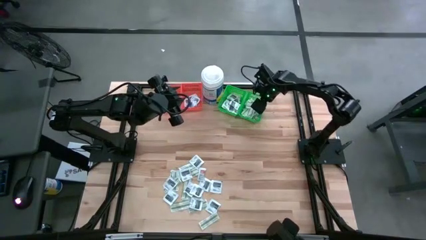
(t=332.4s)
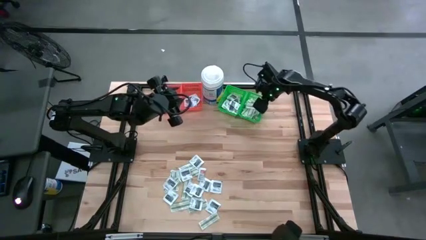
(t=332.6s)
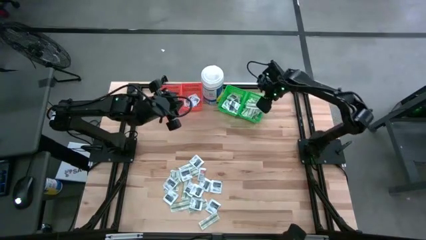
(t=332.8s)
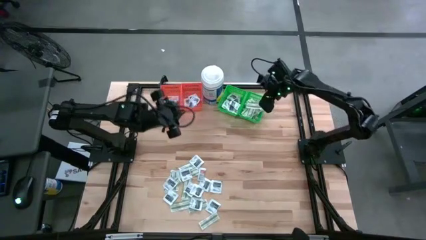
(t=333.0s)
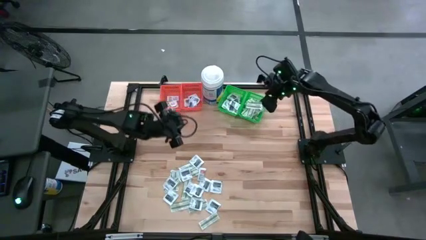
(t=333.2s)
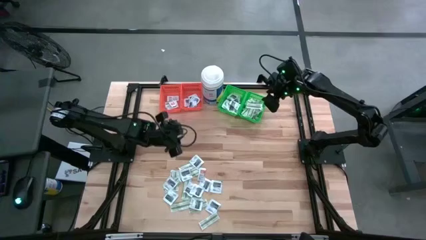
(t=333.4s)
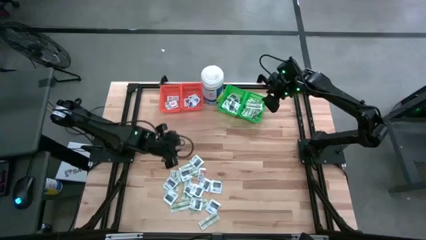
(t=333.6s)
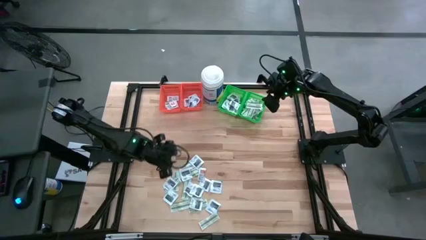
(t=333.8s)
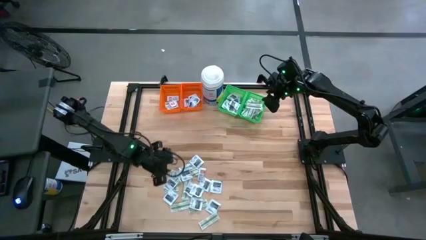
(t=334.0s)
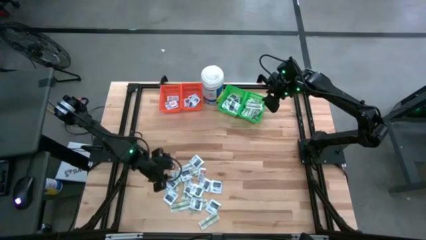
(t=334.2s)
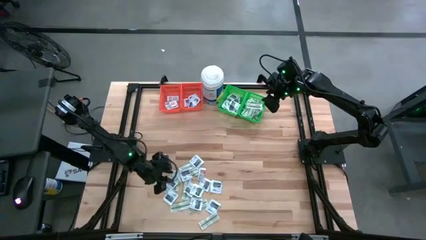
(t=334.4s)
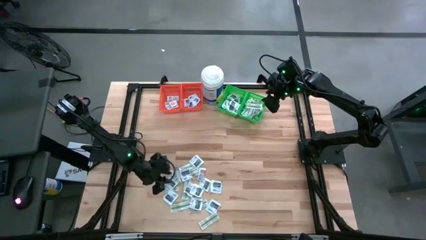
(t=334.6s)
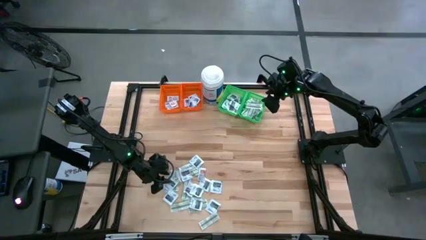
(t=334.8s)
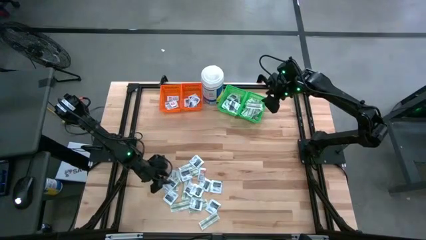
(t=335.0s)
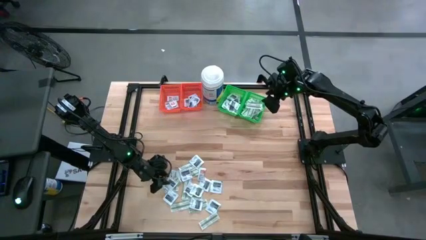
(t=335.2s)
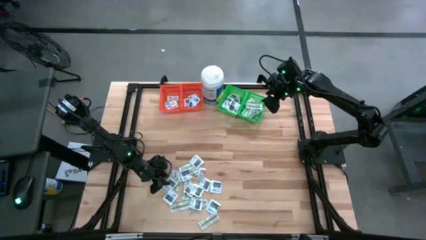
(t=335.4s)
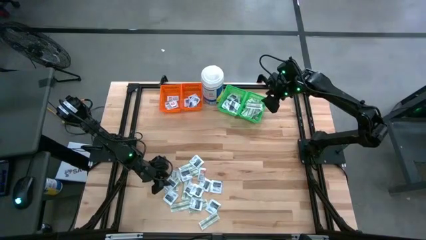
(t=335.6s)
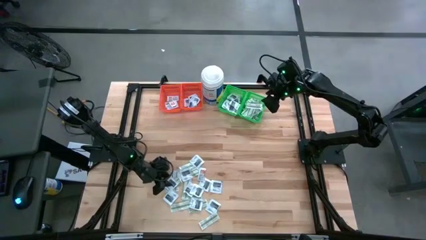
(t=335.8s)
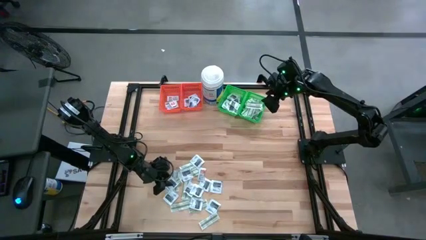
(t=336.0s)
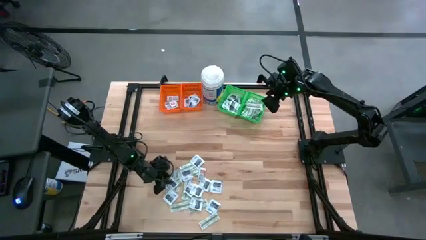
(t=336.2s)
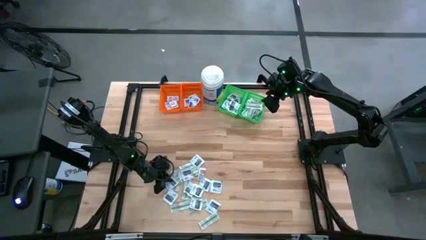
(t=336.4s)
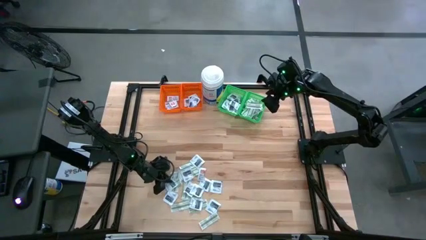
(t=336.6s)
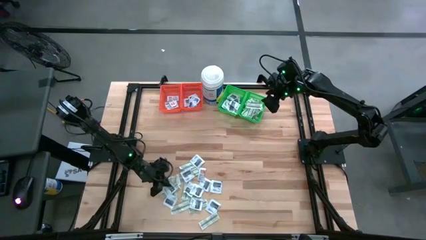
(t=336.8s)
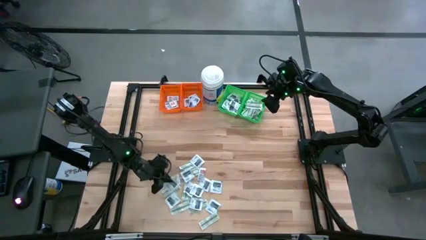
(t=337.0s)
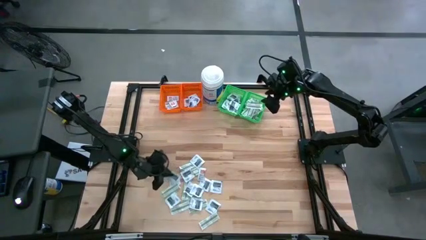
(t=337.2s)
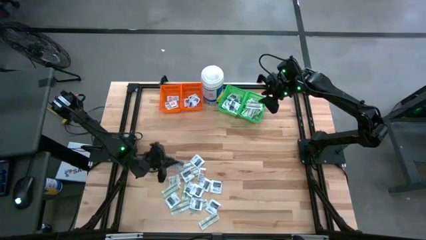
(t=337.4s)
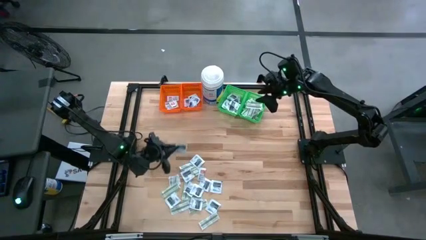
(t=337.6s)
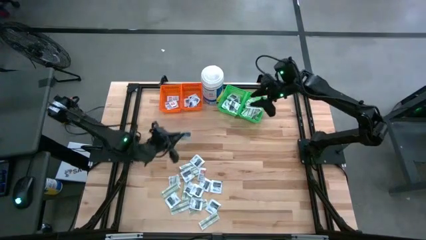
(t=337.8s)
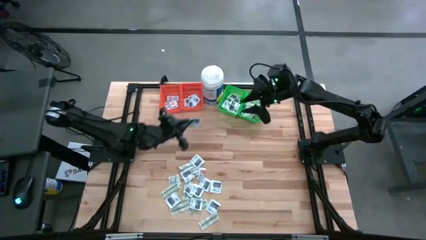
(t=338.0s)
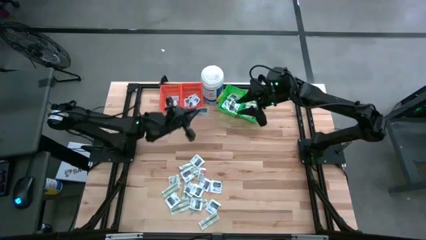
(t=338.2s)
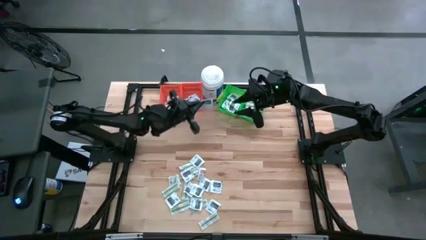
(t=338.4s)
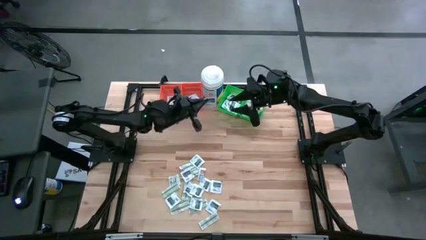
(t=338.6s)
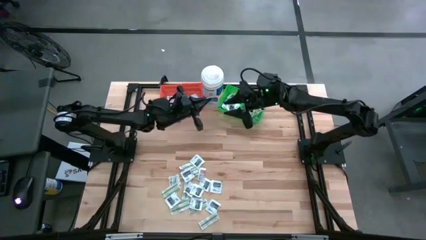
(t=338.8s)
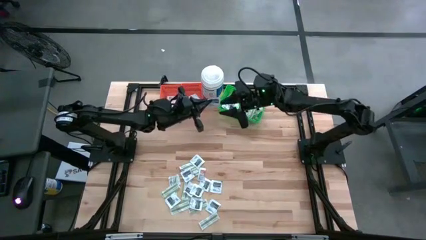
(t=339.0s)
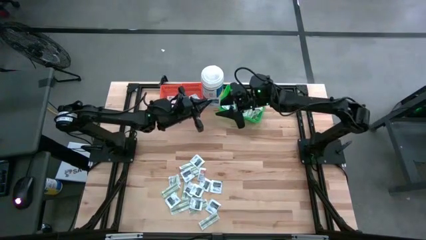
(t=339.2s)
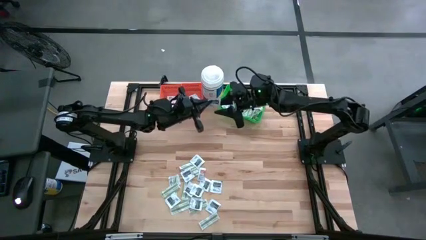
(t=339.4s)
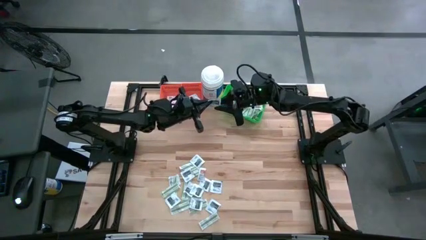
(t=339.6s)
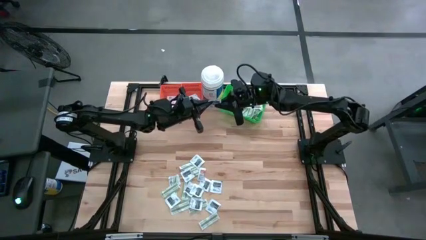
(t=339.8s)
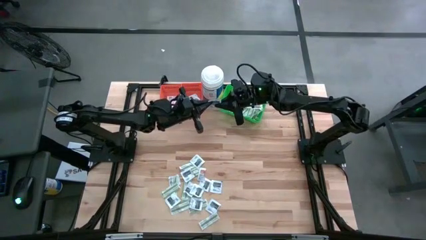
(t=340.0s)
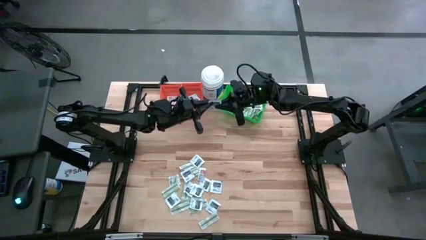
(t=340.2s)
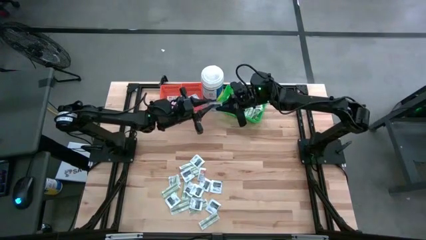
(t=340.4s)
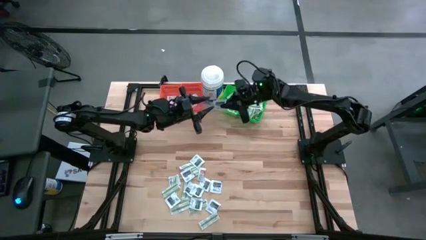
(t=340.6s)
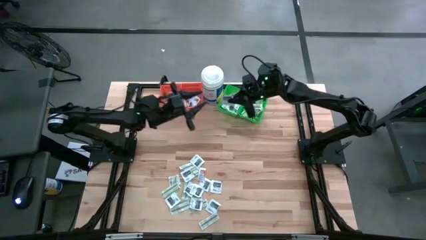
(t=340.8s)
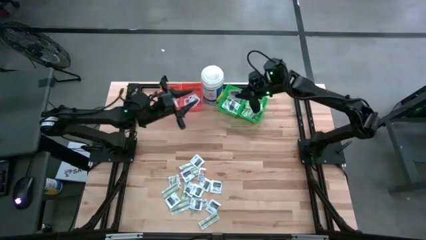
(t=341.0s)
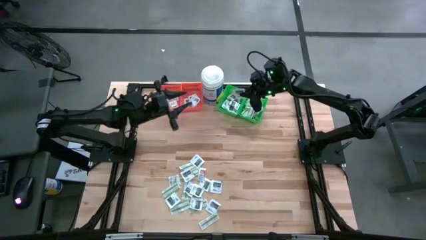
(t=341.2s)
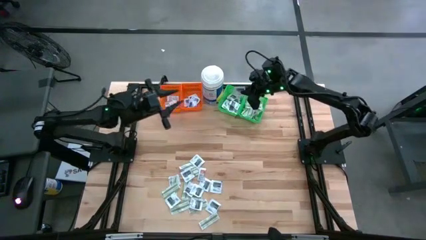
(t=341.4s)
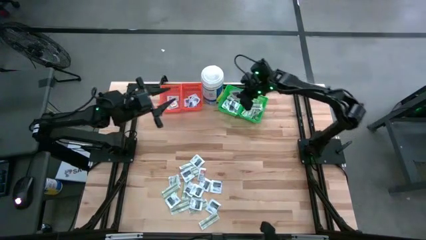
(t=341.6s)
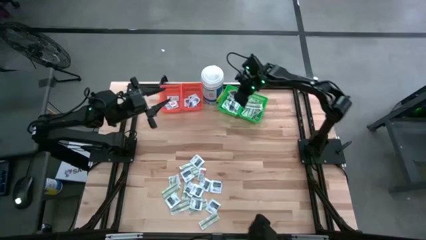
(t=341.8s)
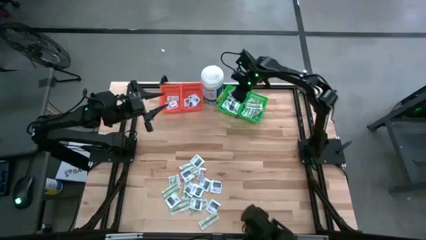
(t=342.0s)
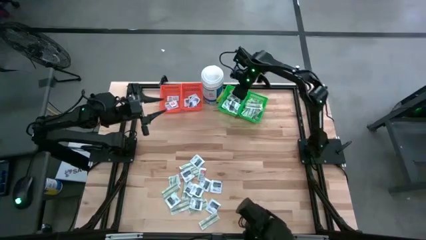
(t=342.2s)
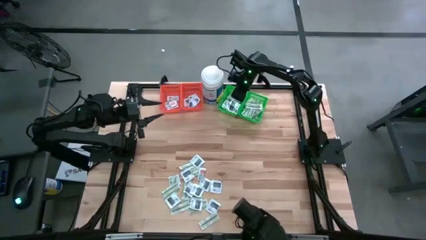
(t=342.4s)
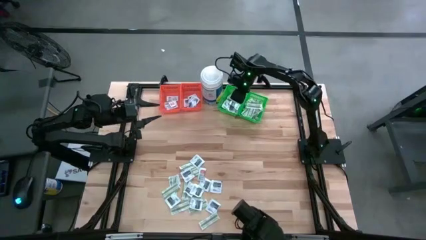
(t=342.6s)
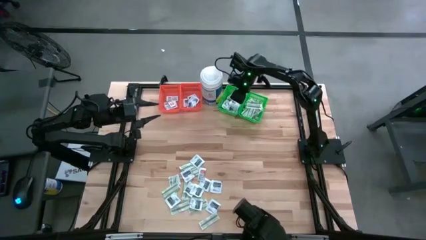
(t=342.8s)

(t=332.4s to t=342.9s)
Task: Pick & Place First Aid Supplies
Put the black towelette pack into the left green bin
